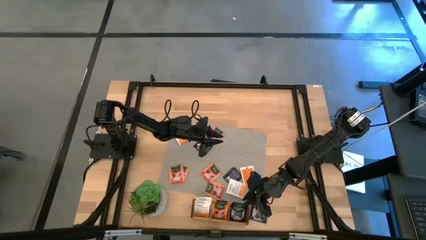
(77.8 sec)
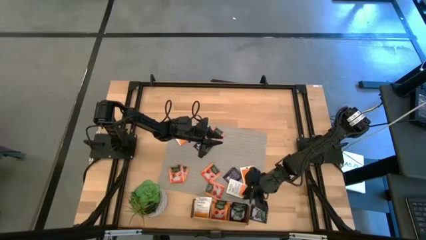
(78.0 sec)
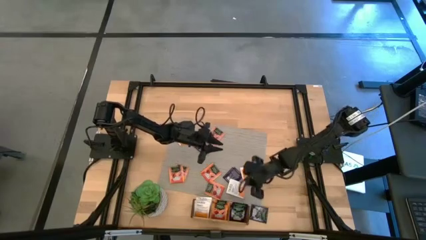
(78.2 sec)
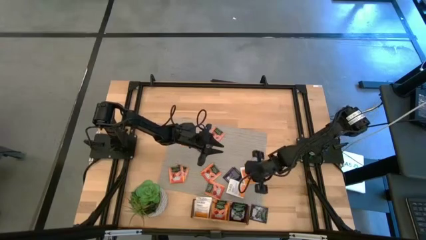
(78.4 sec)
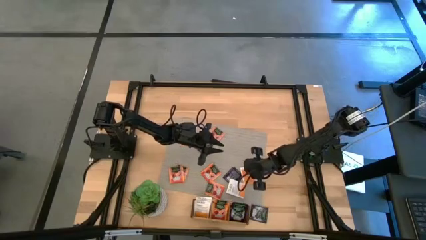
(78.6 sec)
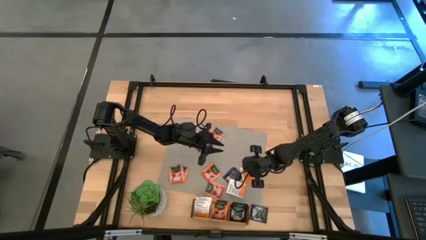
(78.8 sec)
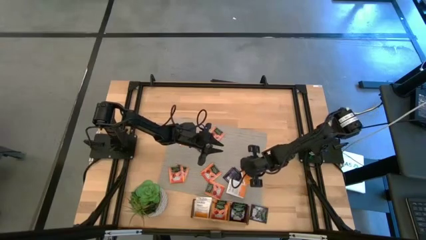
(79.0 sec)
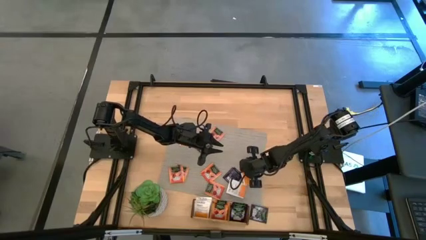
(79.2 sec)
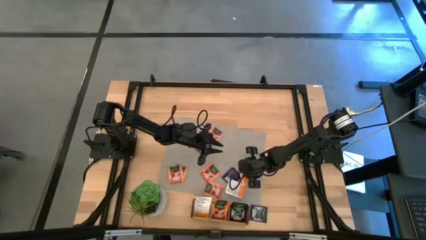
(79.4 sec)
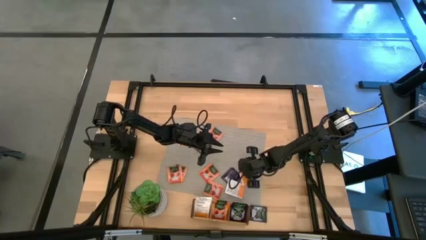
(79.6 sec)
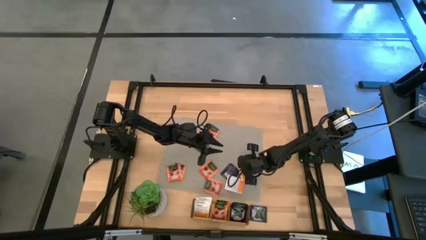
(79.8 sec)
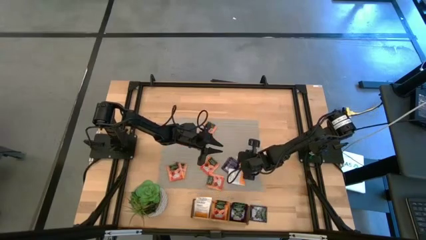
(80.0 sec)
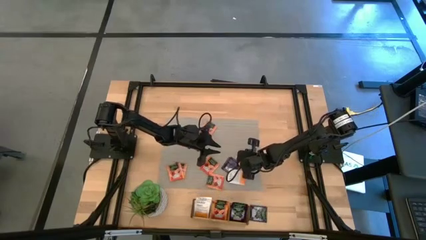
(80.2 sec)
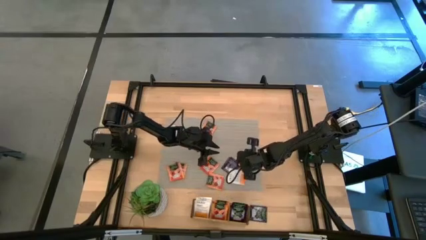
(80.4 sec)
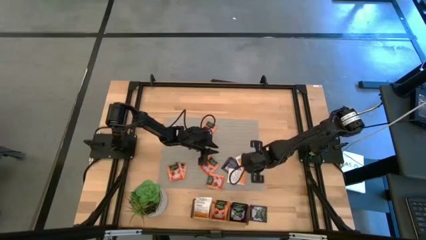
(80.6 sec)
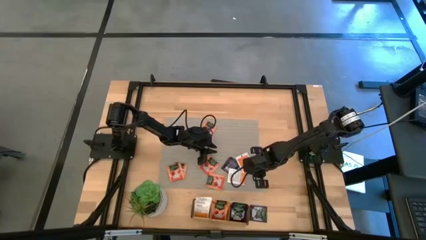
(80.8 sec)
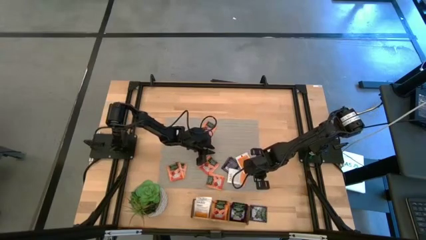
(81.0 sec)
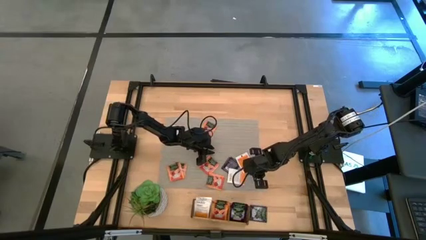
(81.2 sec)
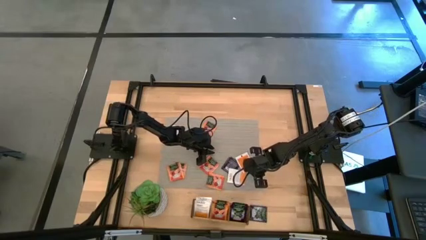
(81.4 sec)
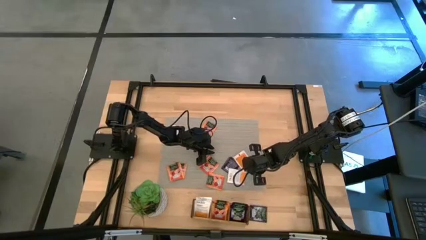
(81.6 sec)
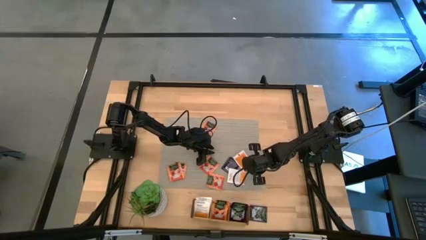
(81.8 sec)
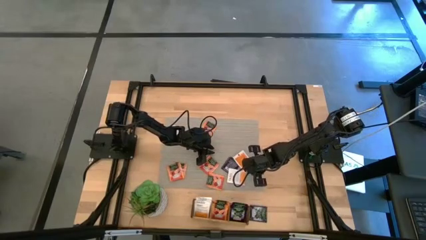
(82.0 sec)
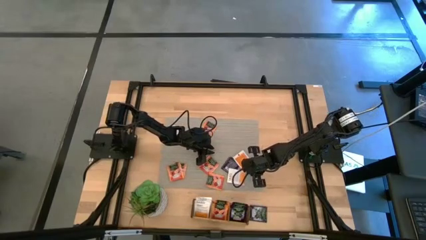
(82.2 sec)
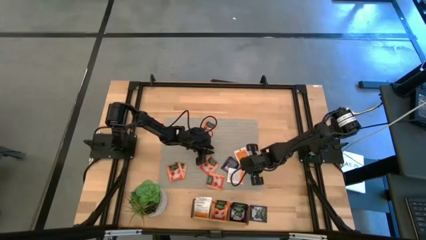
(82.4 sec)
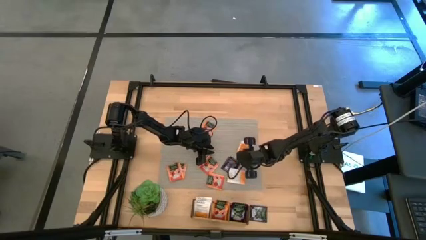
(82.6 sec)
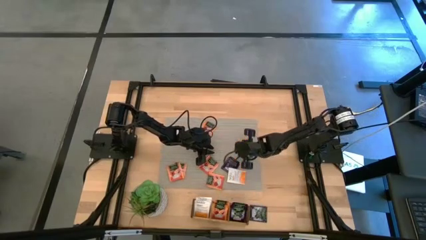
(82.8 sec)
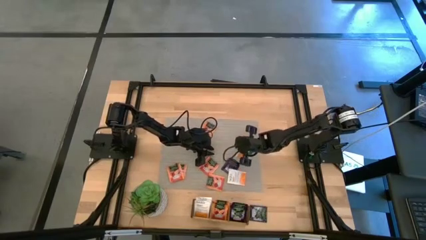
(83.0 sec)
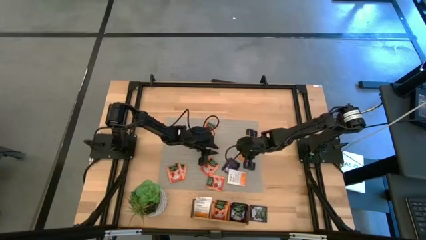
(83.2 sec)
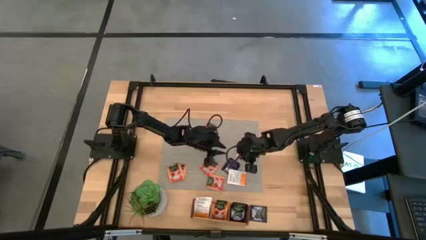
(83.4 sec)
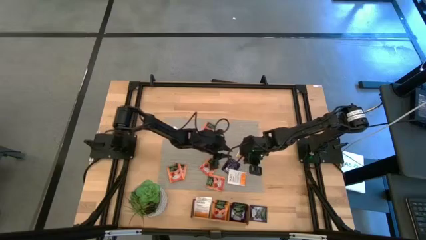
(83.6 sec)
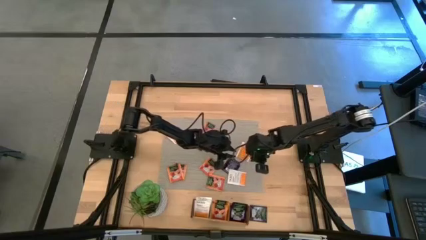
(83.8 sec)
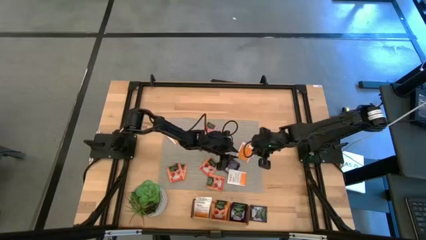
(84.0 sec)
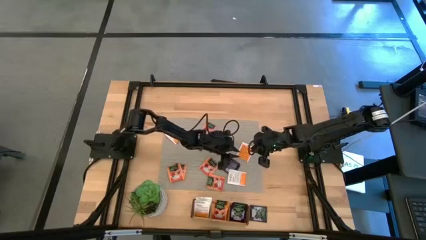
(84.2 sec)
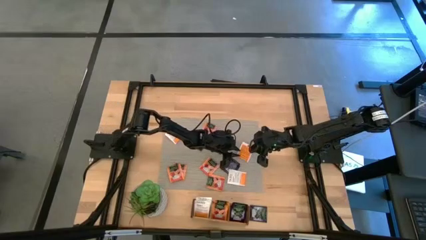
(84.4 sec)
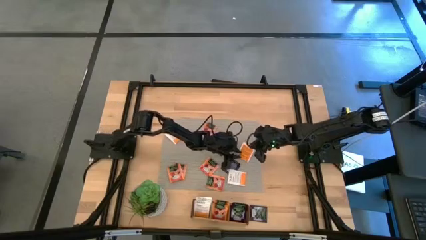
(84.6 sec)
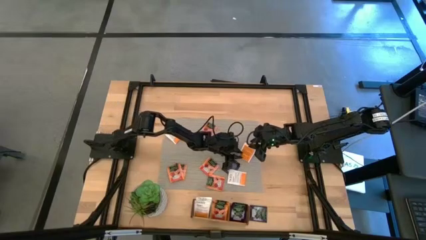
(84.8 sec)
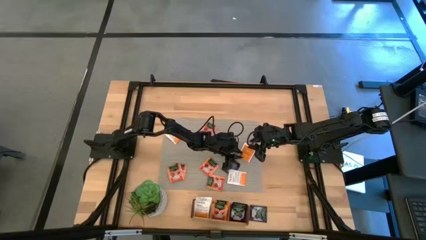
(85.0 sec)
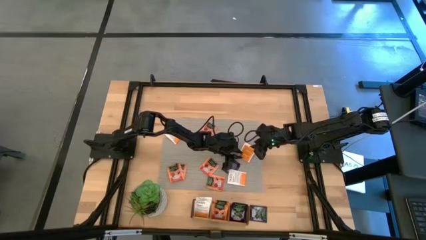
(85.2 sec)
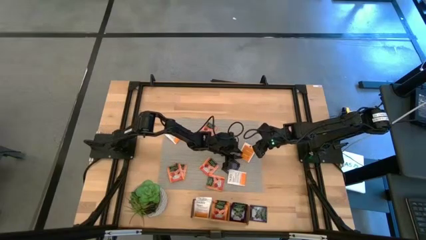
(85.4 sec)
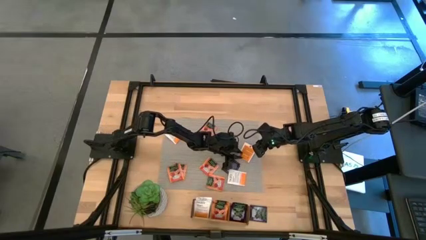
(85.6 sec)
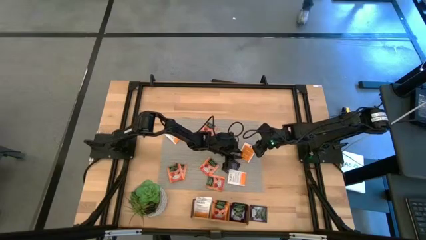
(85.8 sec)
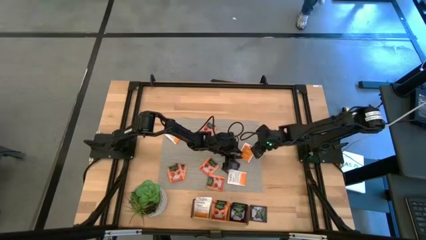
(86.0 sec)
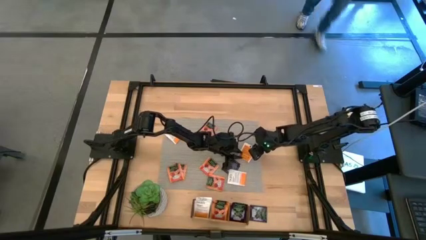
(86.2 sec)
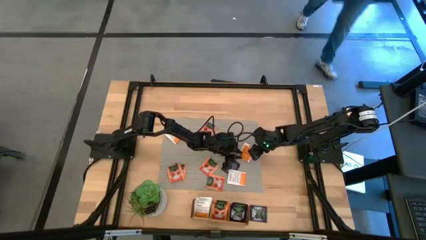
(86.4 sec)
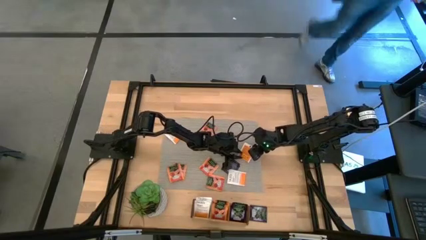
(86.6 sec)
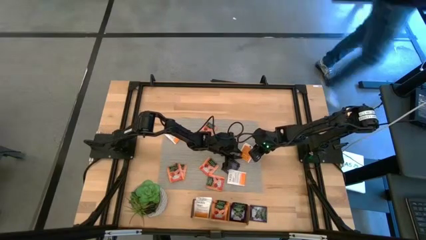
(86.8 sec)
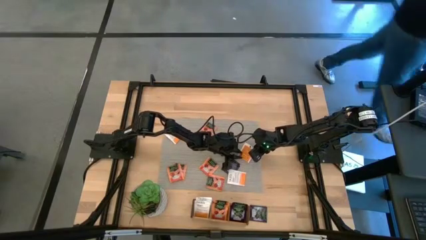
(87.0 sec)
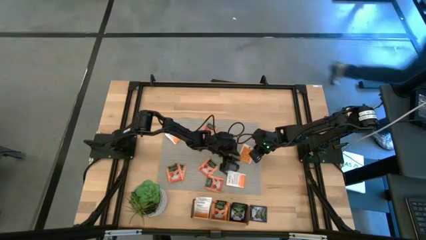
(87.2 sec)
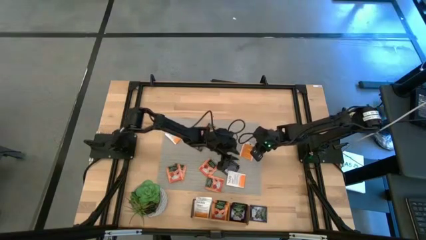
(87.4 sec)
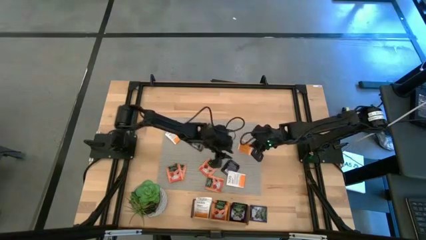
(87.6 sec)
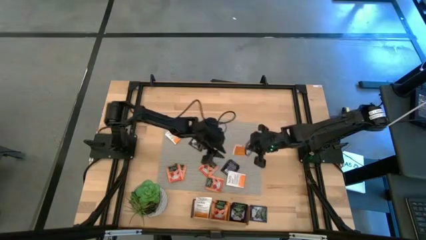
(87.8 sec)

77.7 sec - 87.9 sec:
Task: Pick & Place Tea
Put the white and orange tea bag into the left section of the wooden organizer
